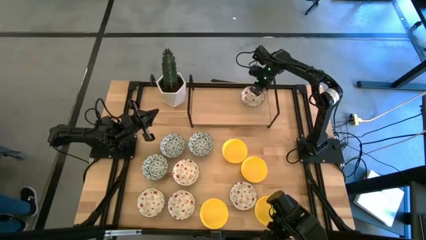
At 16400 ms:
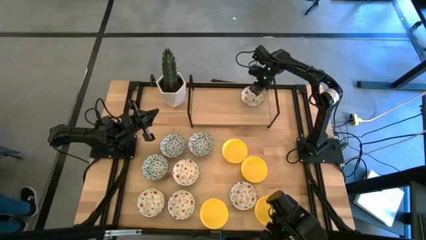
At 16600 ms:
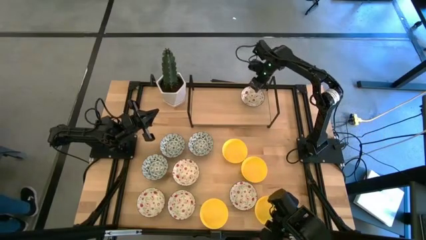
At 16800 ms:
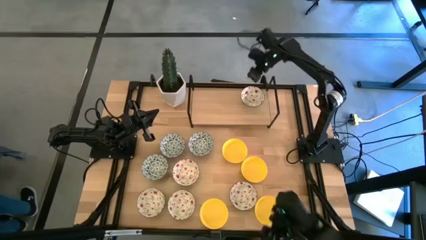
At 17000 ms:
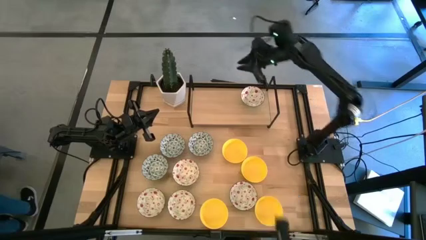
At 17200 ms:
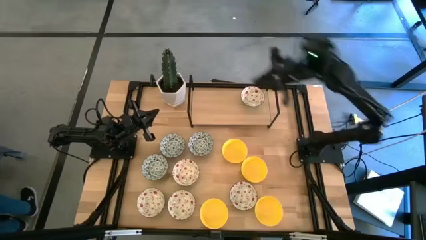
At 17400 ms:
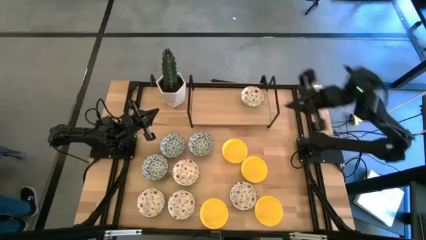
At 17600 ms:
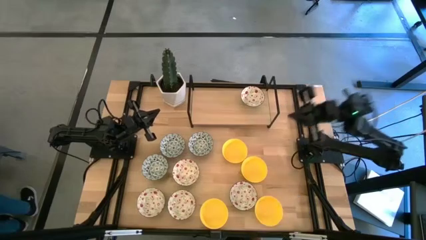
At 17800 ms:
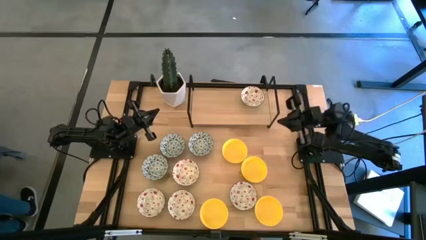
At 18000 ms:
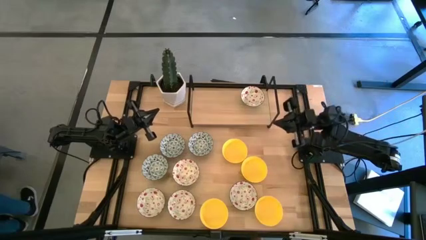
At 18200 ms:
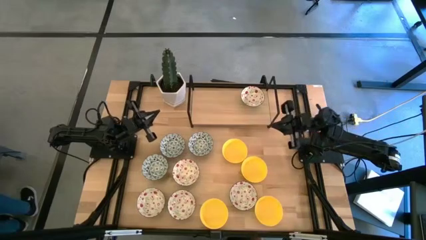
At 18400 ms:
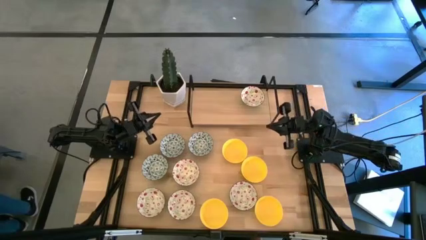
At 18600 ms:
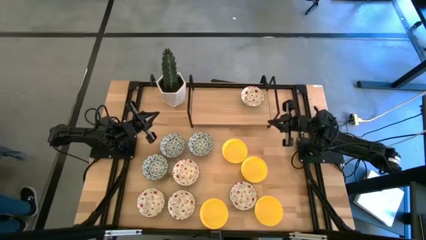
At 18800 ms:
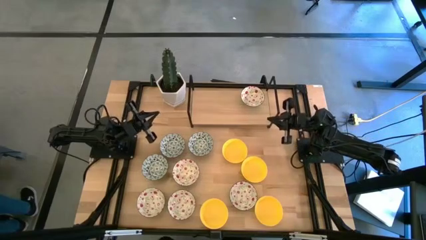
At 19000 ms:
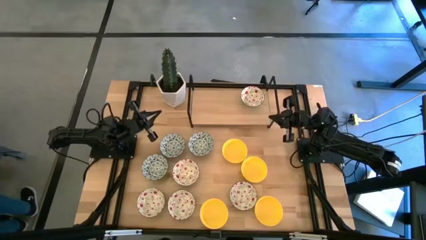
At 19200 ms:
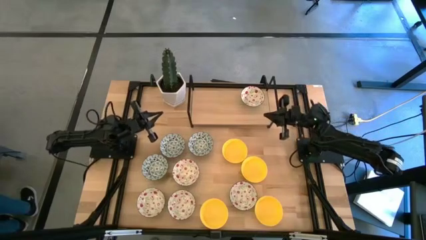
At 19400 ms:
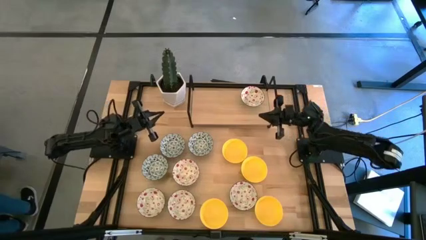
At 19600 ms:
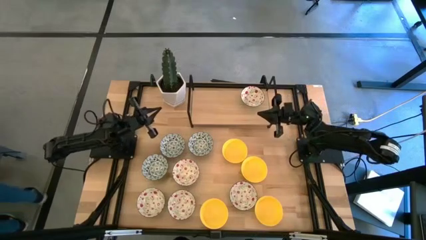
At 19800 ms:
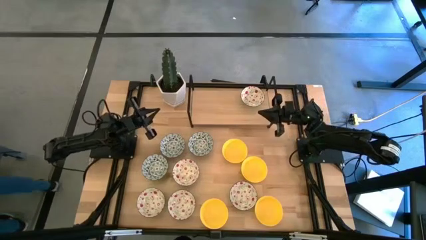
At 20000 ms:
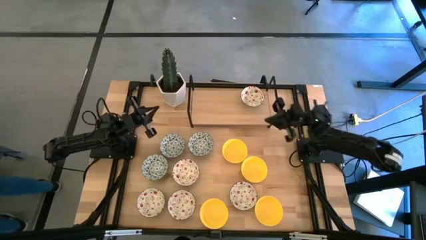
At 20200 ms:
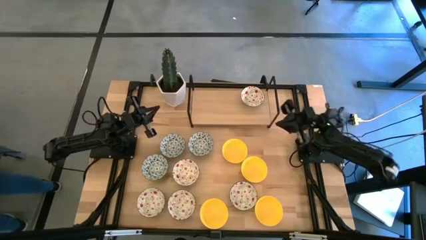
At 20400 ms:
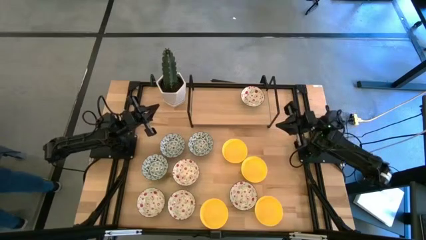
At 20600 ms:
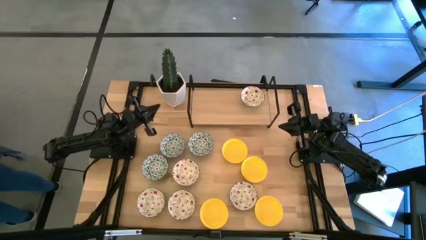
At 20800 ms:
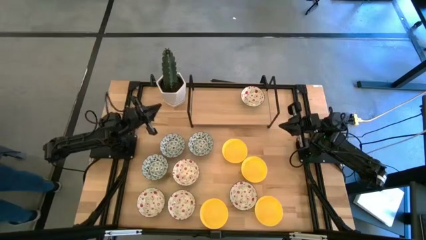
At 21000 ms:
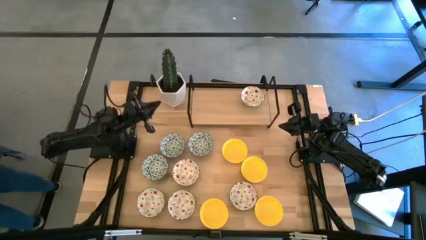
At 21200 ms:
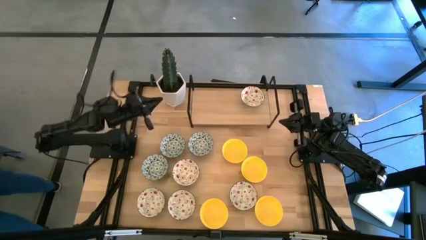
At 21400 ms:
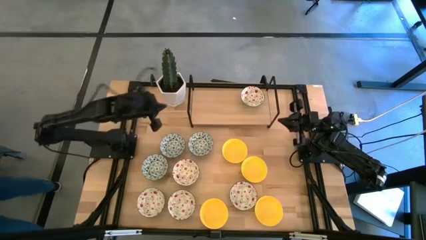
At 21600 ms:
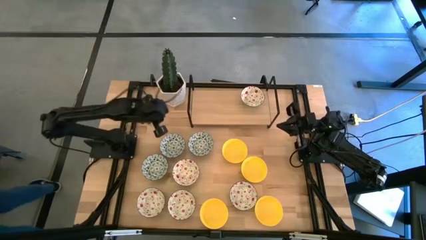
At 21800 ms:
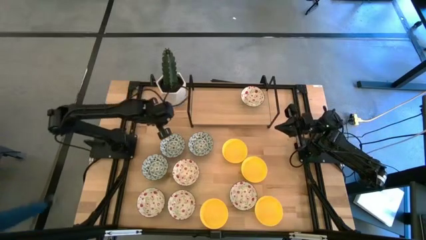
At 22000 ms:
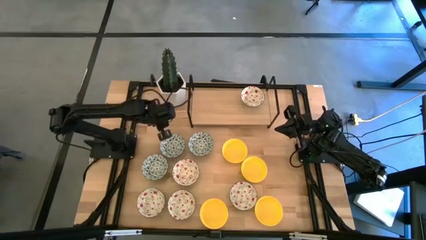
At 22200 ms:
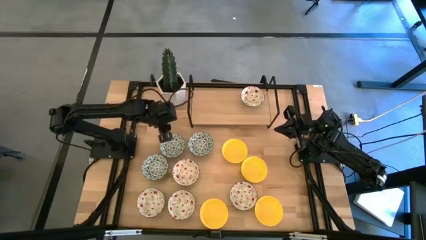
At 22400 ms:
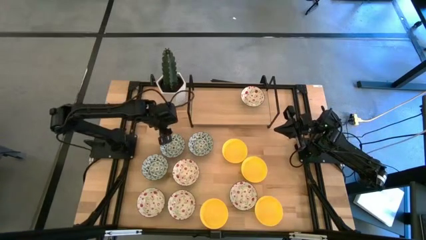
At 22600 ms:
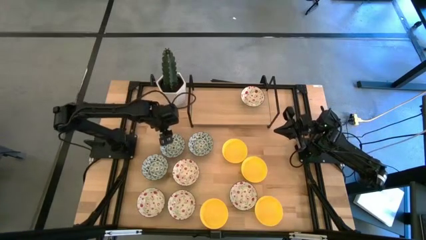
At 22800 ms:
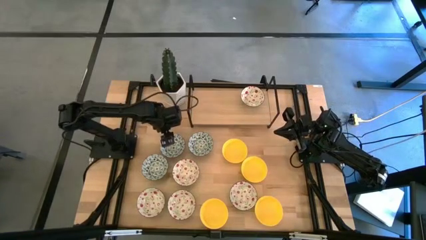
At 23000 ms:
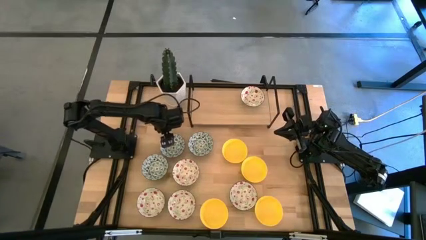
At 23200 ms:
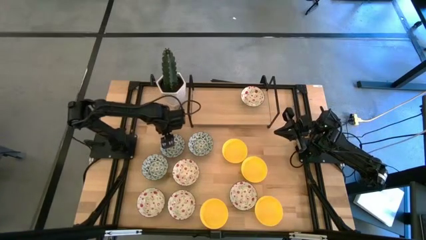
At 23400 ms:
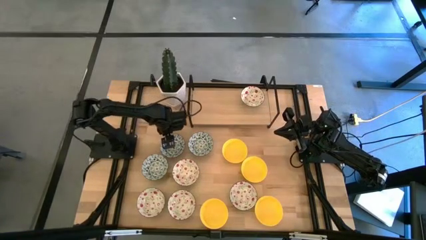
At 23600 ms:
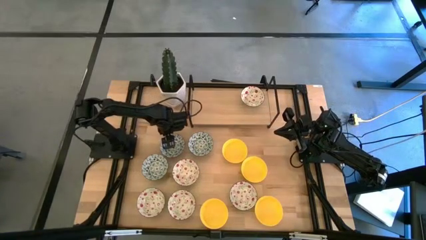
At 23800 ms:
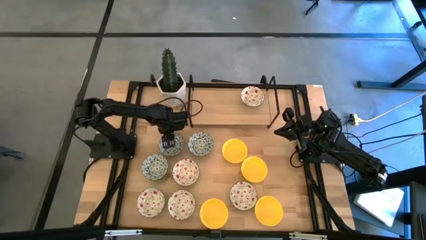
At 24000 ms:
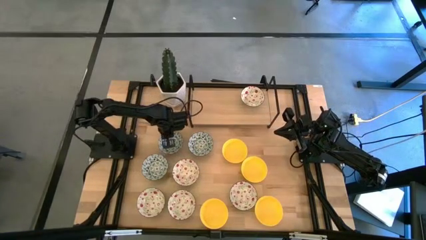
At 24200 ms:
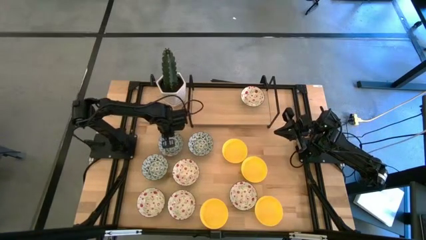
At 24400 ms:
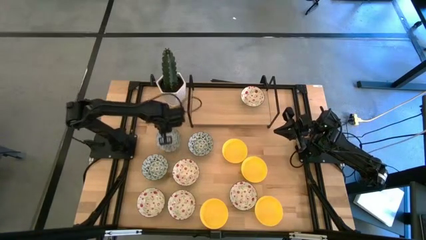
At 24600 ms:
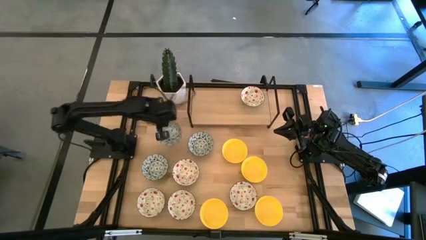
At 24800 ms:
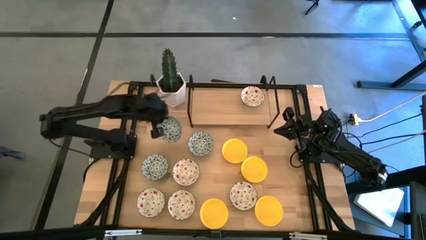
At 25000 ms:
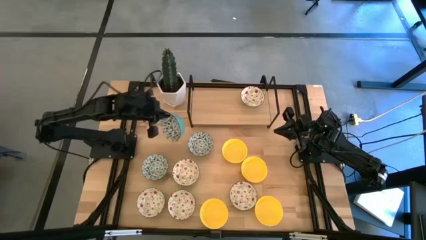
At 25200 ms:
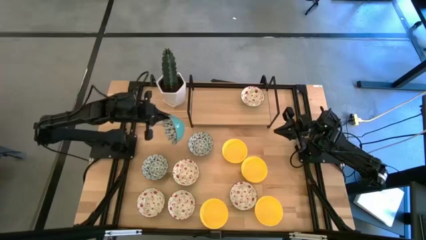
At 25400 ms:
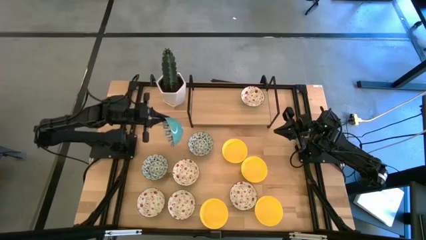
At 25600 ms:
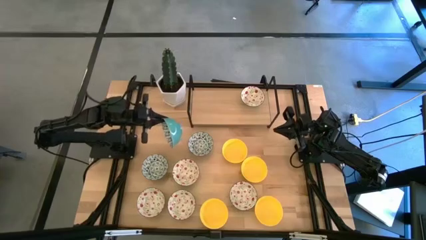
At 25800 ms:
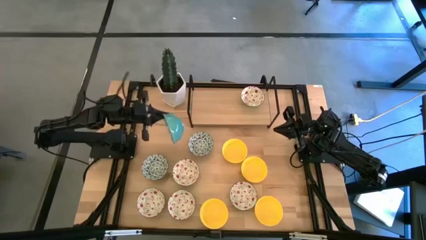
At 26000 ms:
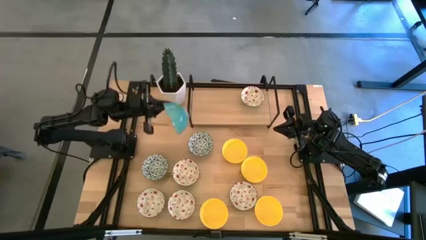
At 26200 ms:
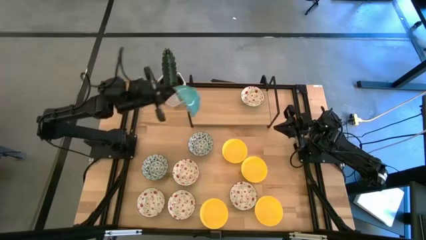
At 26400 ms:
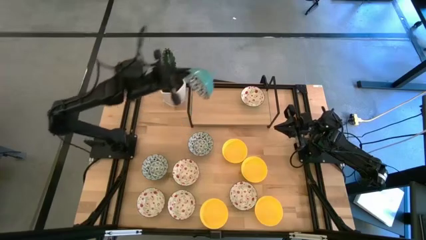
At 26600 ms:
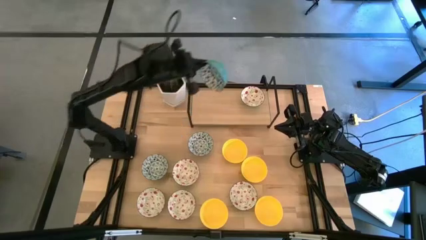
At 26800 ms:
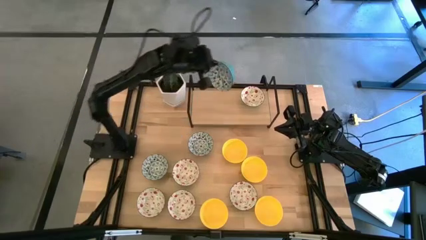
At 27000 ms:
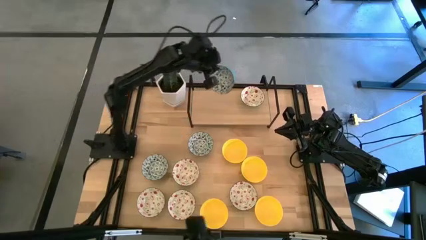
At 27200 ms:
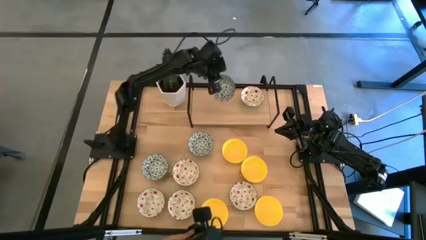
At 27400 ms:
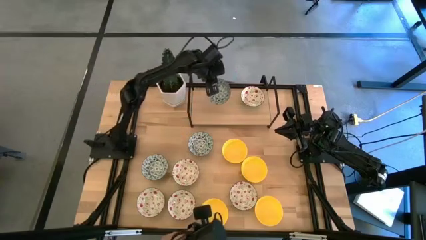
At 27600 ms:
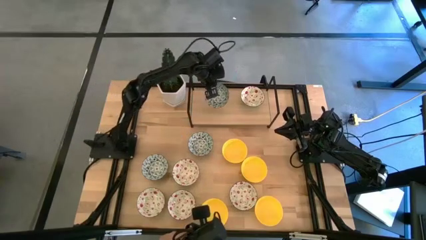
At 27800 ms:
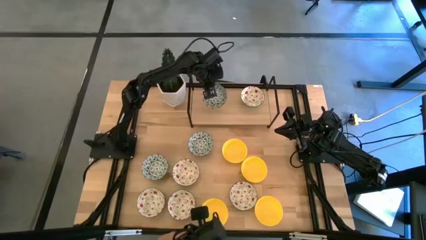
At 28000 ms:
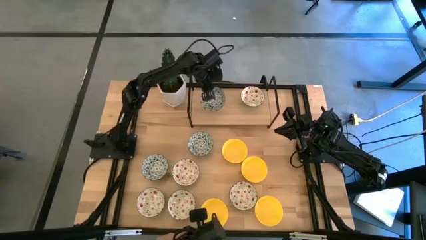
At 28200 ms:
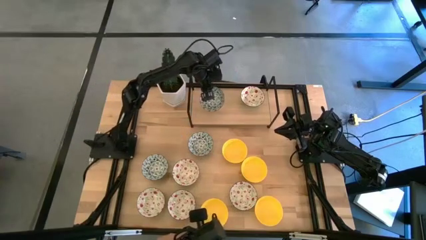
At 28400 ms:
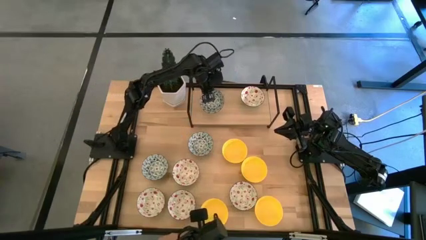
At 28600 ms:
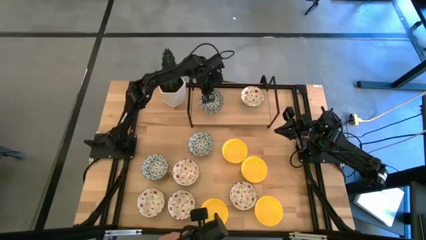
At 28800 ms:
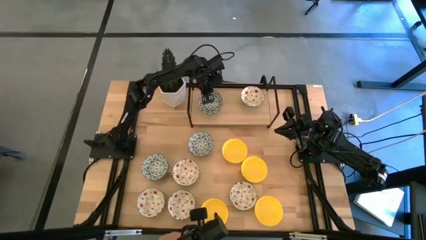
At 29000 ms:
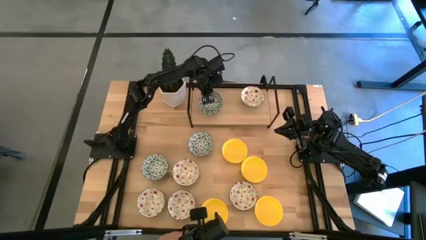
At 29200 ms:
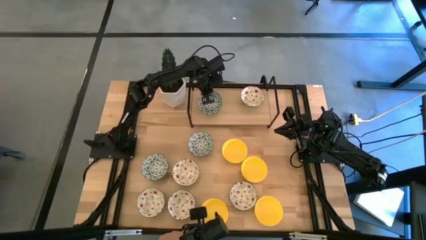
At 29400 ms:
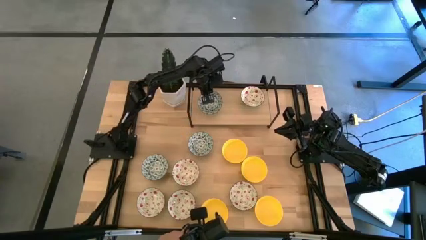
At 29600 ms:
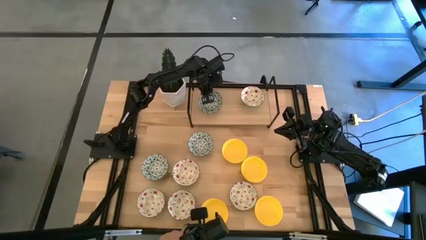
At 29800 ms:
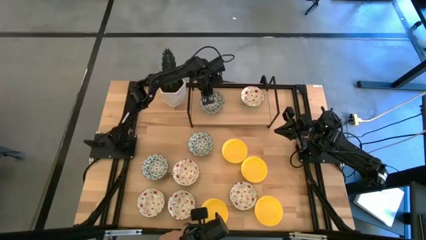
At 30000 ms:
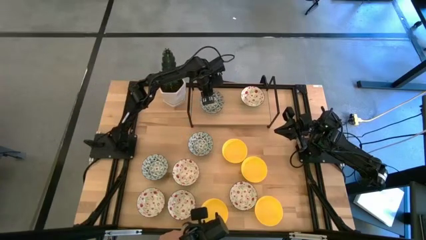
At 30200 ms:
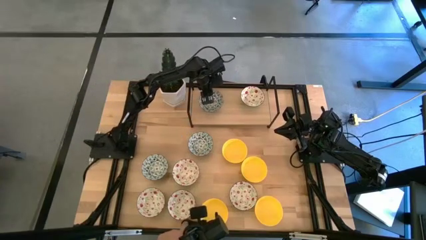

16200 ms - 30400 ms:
Task: Pick & Place Mini bowls
Put the blue printed bowl on the shelf

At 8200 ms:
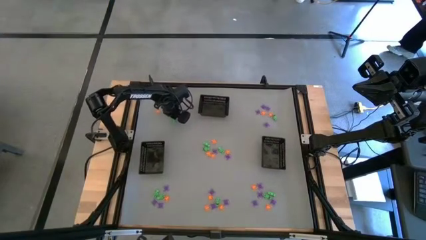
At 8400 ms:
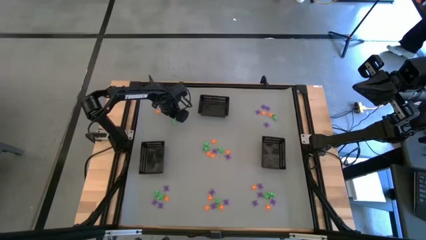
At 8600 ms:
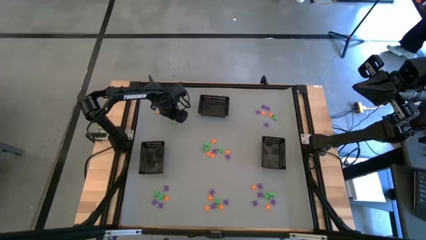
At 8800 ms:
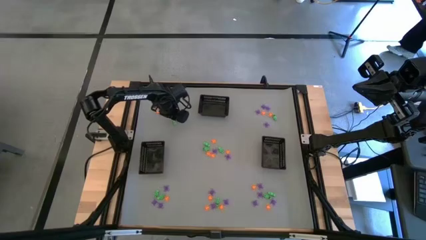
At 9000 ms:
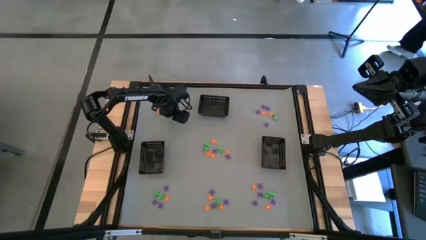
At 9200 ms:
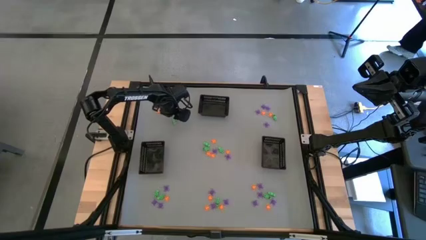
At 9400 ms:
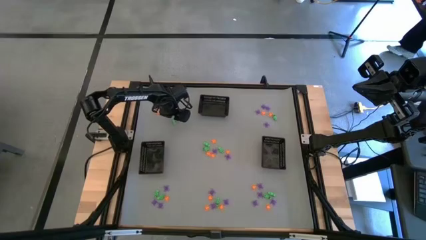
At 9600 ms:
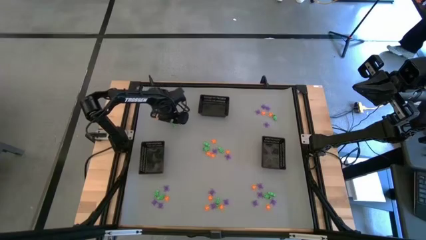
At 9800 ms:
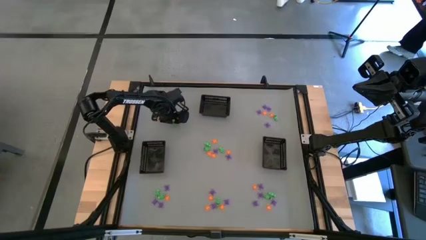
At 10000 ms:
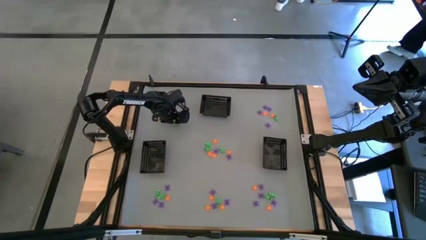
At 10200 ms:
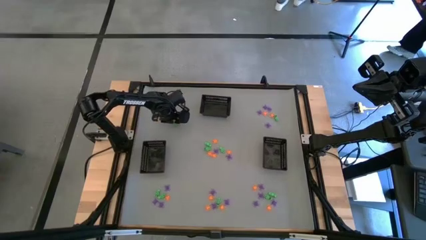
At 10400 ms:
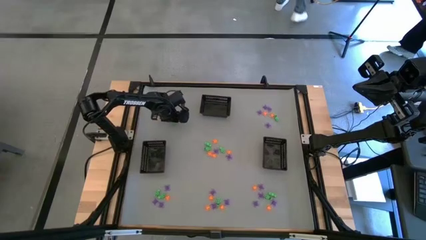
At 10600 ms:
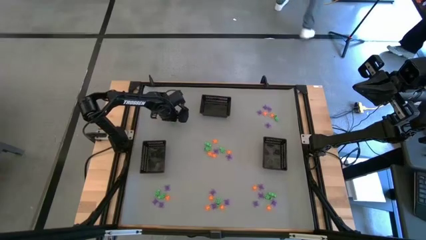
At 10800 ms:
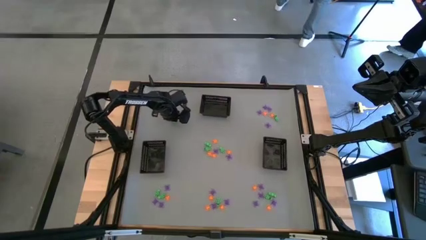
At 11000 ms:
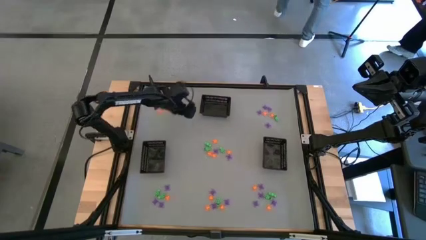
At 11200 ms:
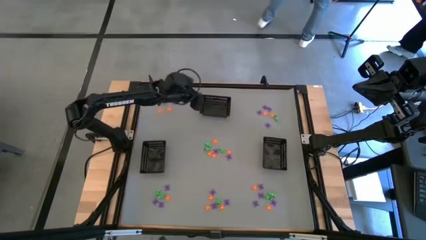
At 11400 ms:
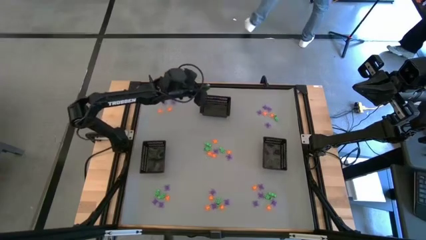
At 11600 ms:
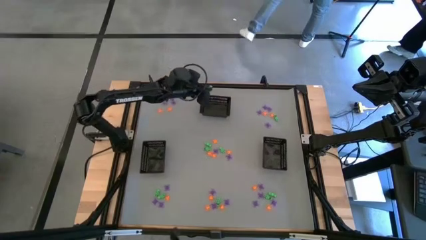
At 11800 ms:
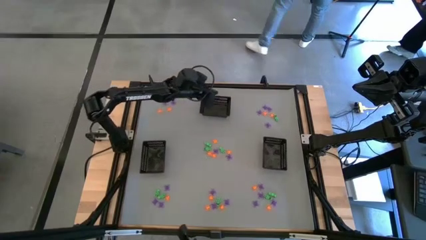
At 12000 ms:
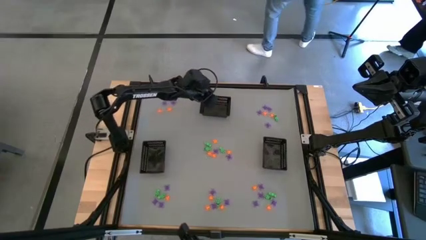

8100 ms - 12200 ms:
Task: Sort Halloween decoration
Put the green skeleton toy into the top bin
